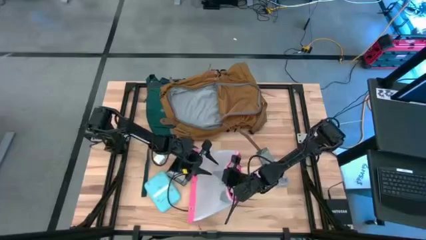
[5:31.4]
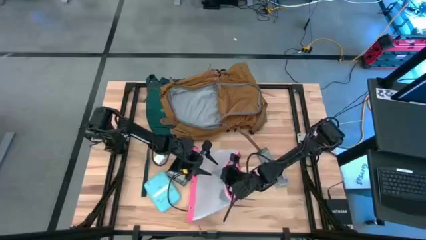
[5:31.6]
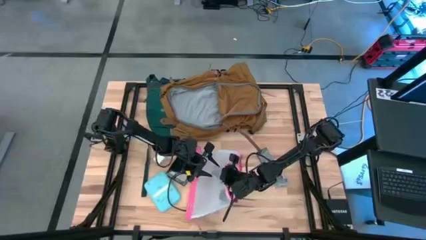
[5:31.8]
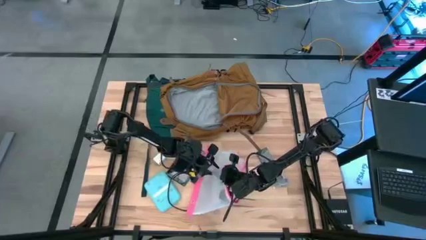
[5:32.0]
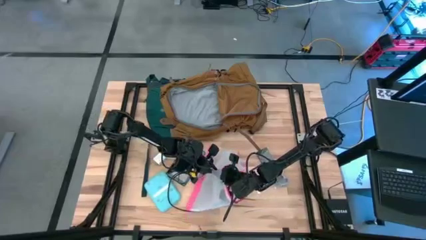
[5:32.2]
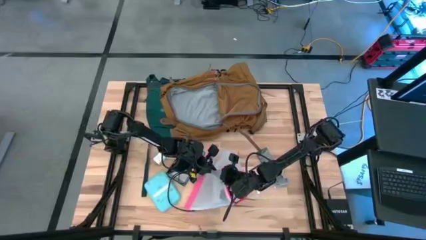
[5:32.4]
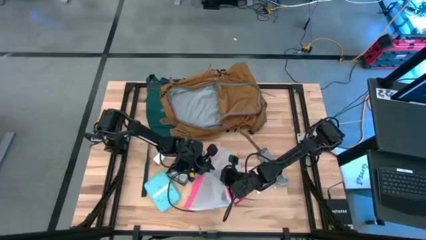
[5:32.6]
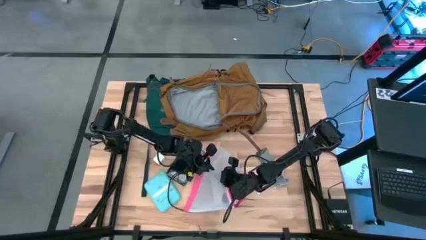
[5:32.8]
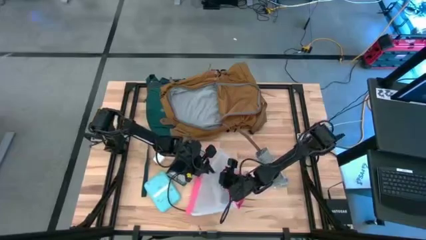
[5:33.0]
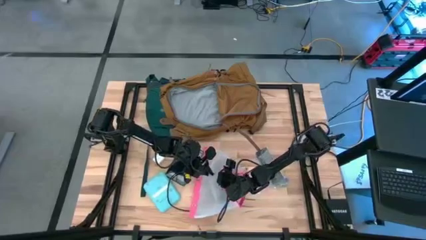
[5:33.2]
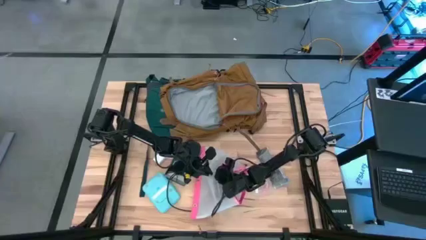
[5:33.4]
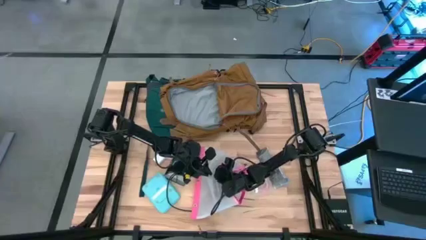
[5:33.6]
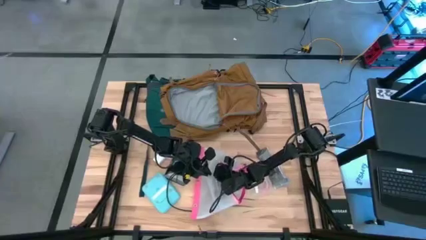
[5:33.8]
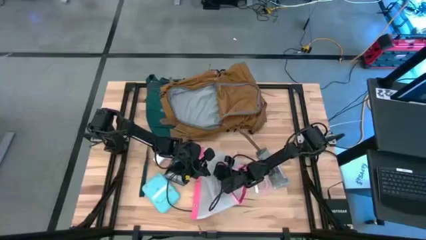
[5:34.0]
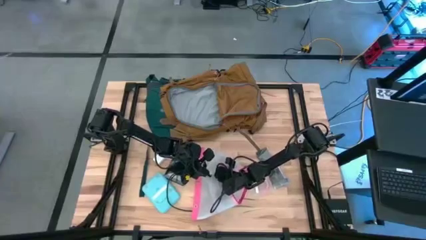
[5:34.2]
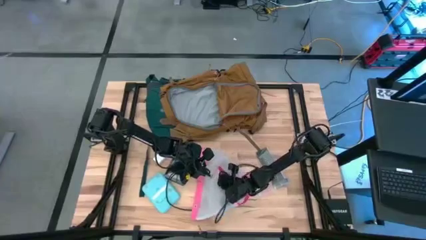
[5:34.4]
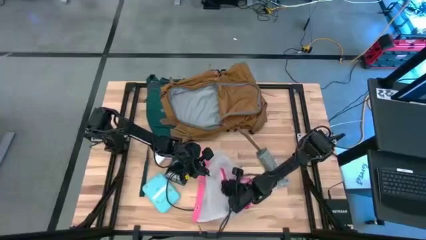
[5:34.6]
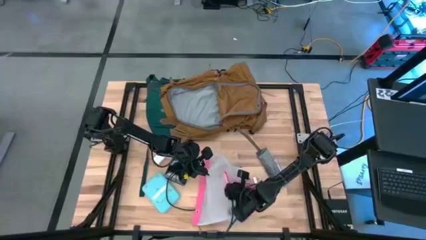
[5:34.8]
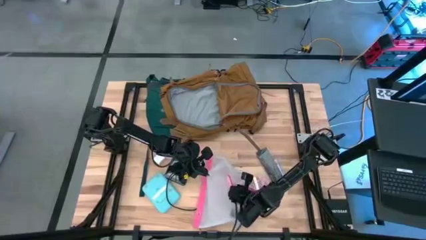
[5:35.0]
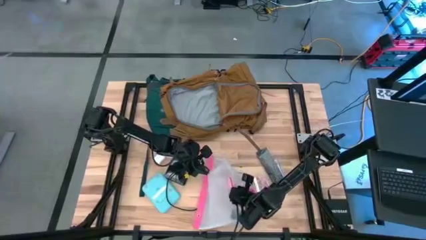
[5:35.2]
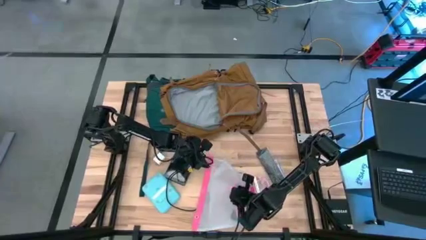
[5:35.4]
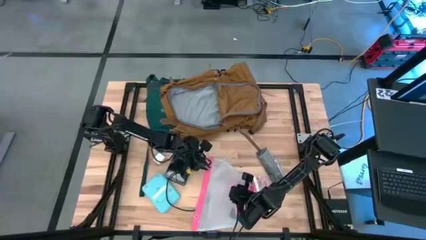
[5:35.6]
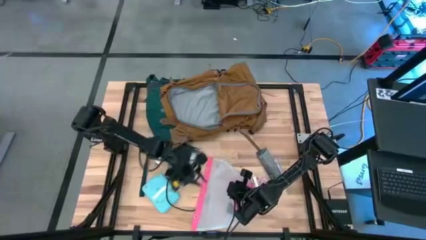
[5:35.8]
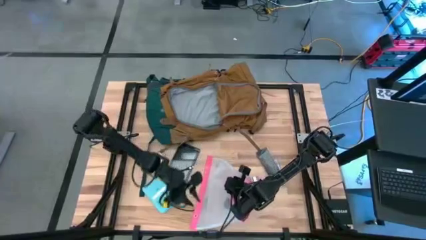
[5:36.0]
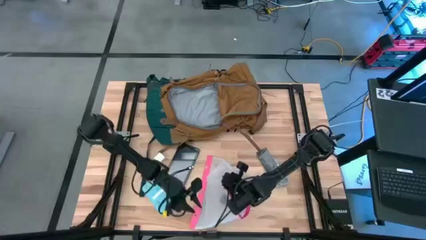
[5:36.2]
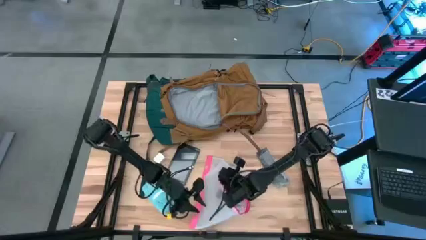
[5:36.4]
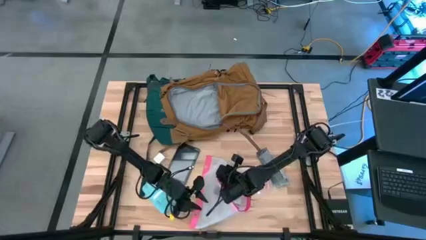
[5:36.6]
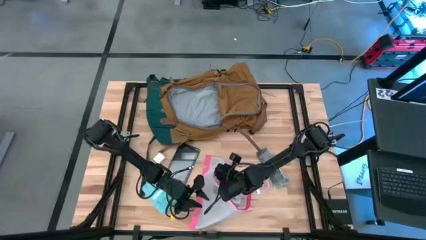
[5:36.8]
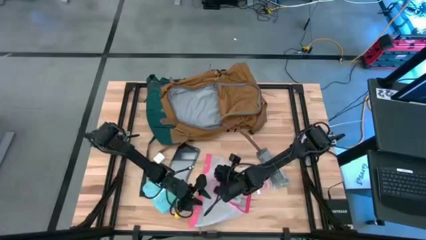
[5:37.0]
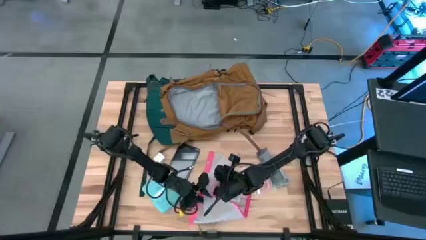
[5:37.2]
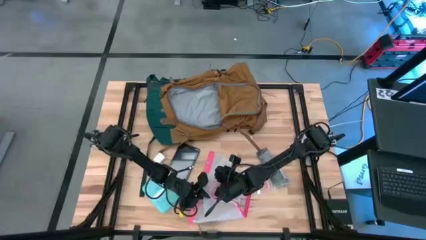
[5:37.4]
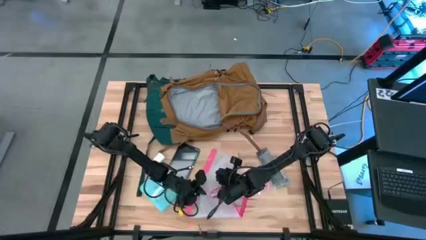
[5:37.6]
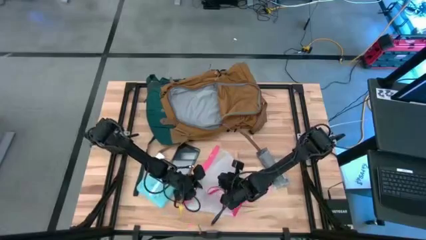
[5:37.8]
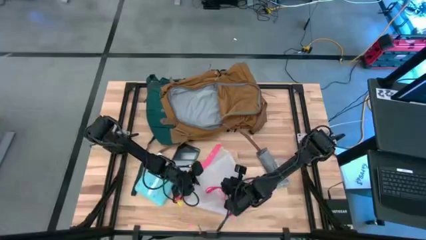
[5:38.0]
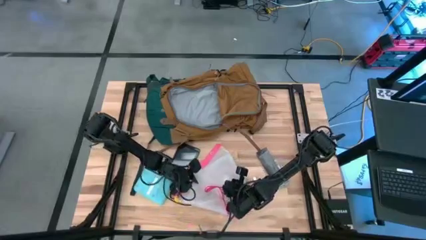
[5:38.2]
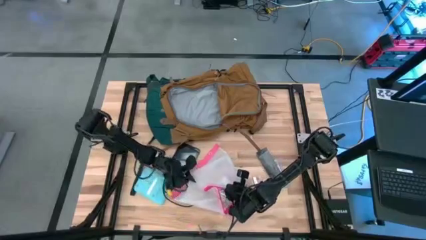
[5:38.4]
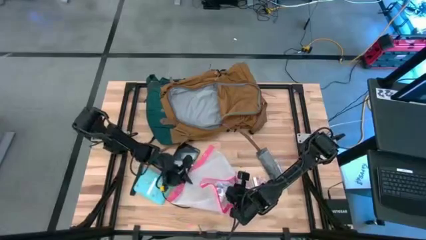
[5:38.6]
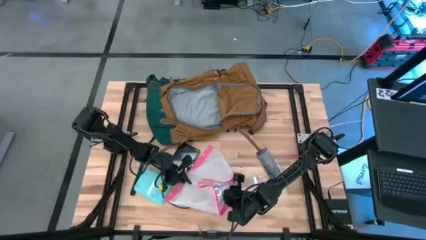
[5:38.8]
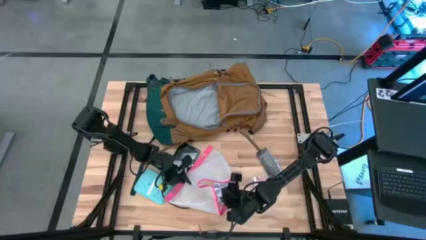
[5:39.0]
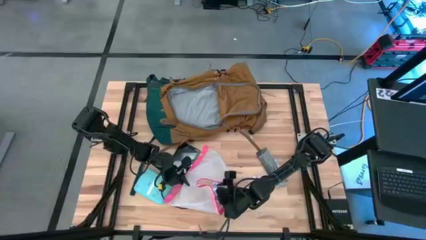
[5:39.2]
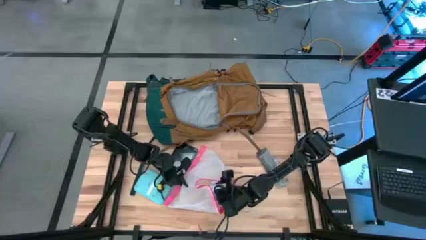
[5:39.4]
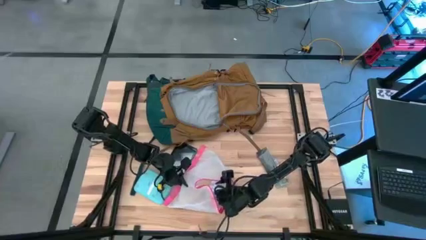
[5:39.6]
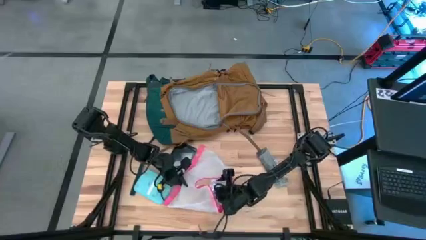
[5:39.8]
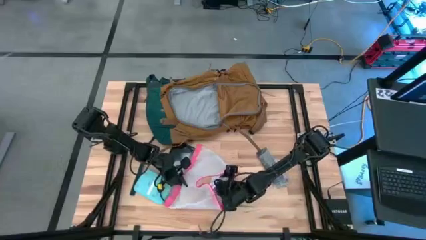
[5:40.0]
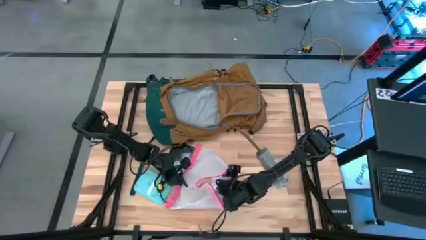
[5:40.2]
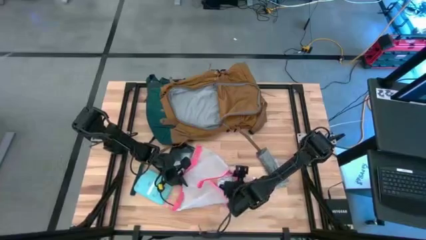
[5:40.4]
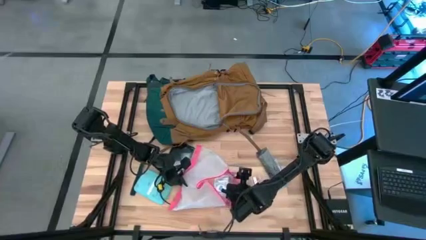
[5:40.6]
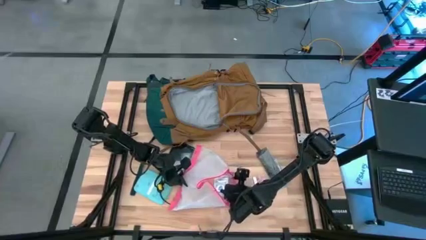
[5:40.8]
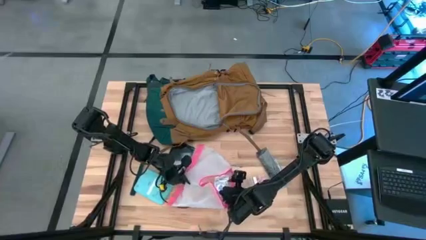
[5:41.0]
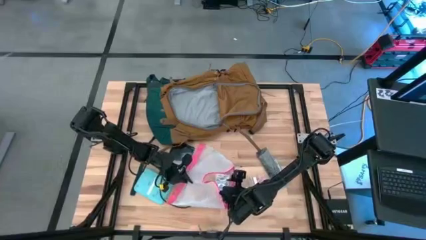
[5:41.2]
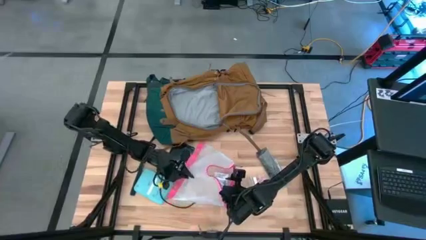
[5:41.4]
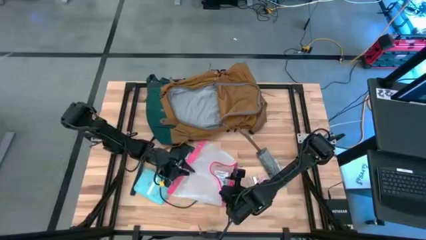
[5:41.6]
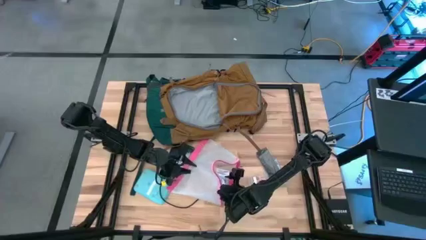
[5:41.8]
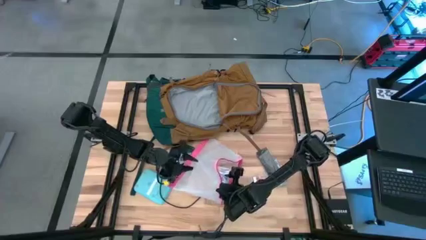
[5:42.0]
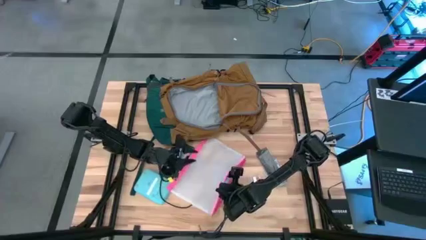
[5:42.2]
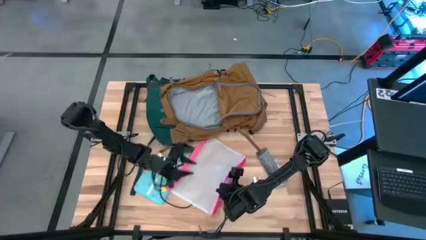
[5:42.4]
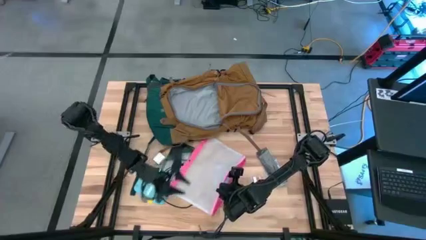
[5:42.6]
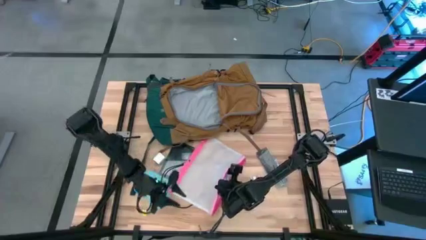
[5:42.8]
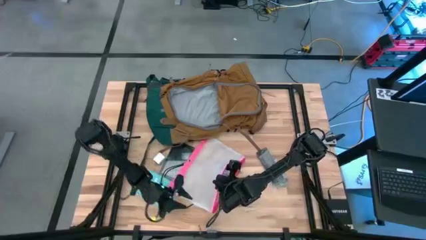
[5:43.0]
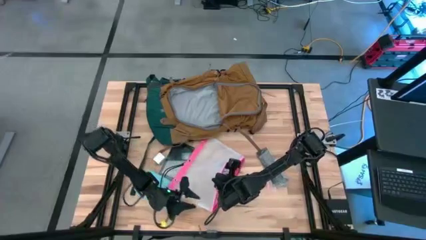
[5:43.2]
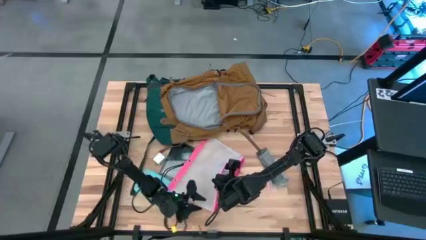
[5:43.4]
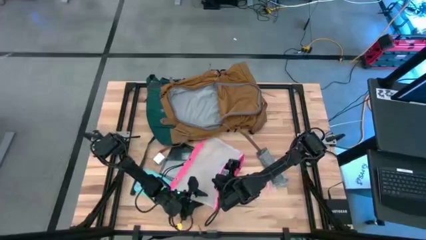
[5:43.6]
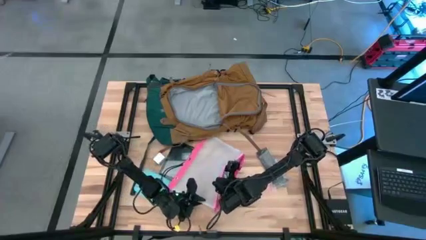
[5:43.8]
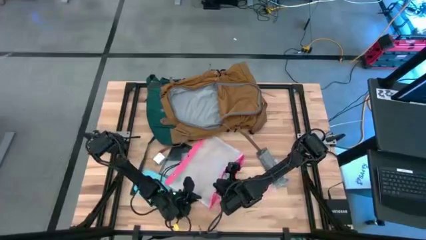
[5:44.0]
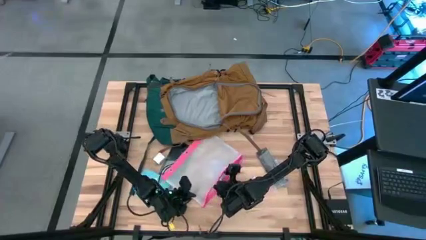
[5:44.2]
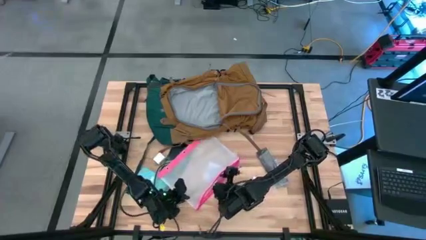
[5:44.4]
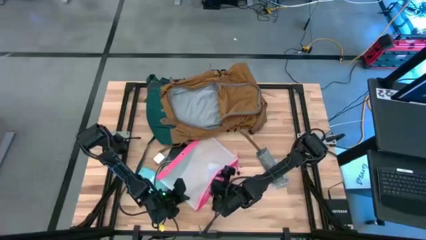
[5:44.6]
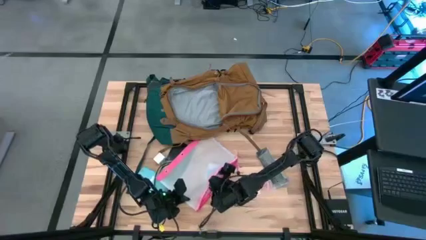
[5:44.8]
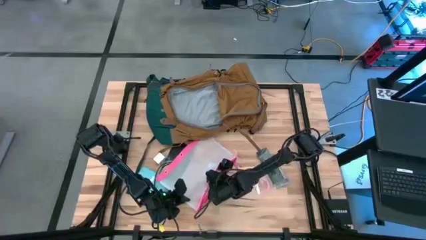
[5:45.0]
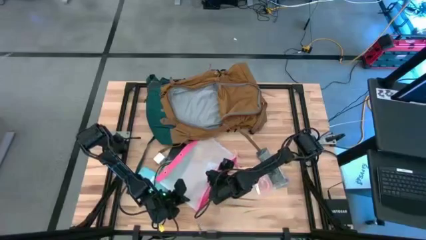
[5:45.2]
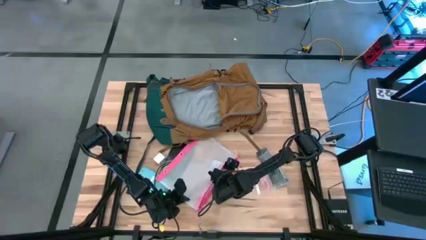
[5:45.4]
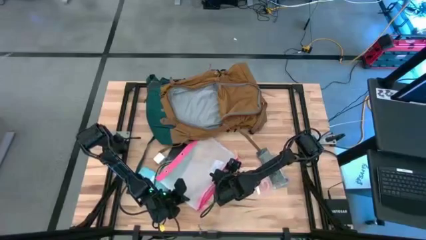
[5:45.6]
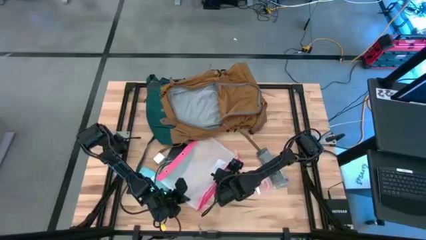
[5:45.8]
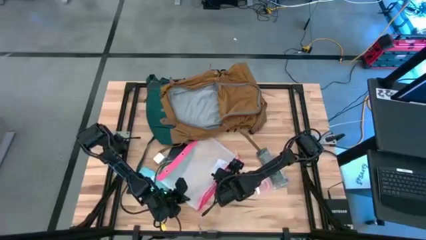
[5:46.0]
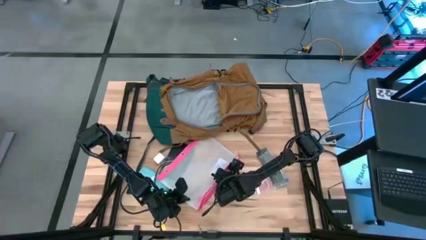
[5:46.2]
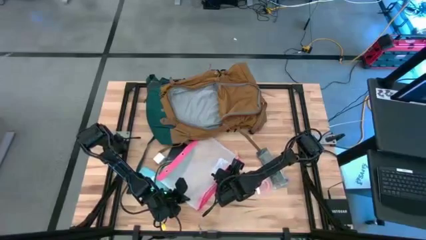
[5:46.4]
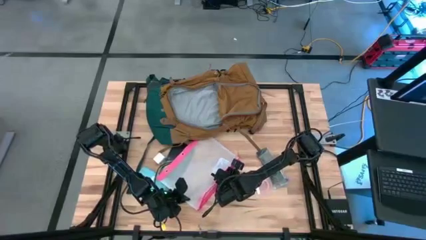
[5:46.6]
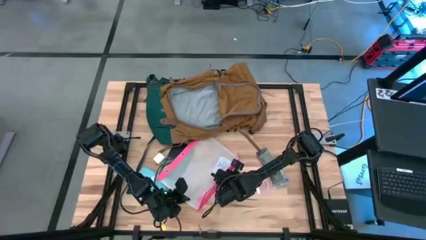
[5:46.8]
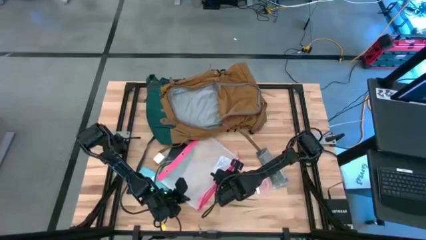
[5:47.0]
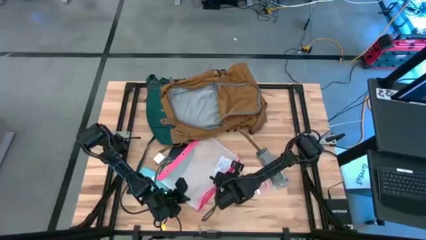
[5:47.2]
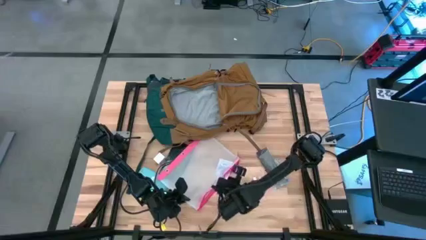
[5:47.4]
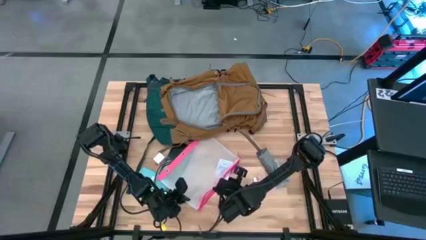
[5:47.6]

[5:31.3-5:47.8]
Task: Unpack backpack
Remove the blue playing cards from the pink zipper pouch
